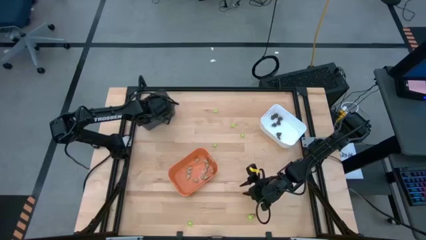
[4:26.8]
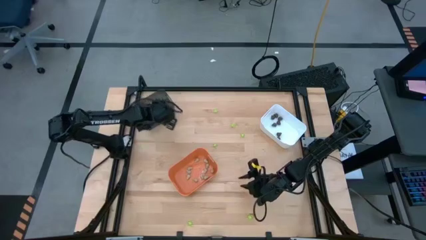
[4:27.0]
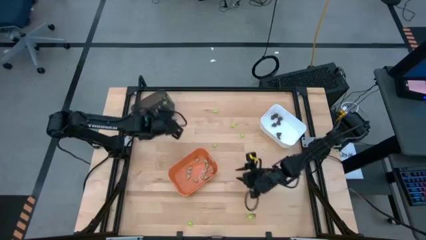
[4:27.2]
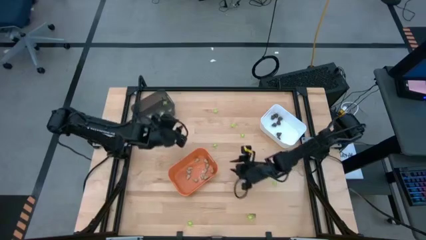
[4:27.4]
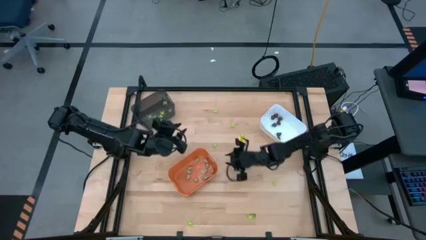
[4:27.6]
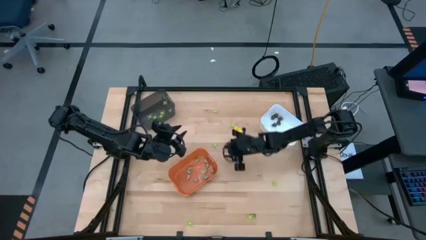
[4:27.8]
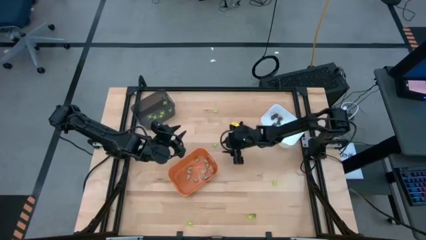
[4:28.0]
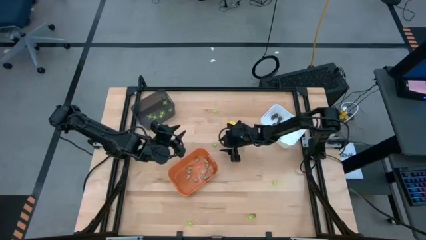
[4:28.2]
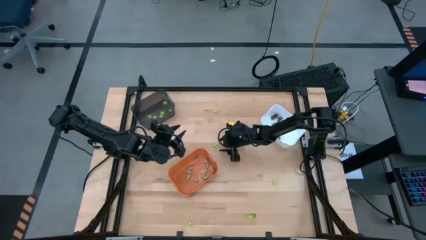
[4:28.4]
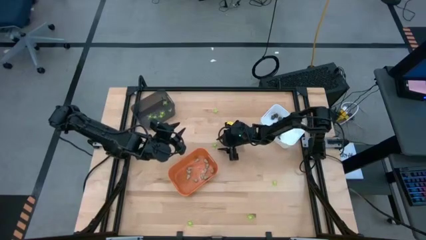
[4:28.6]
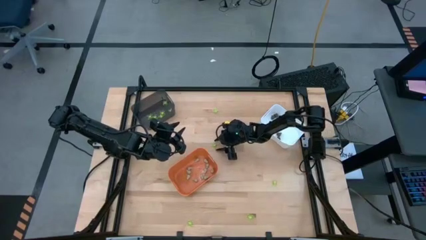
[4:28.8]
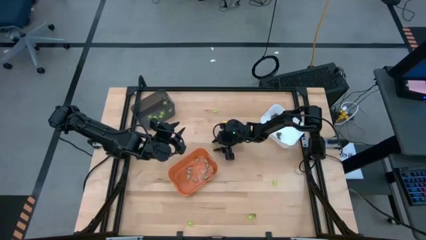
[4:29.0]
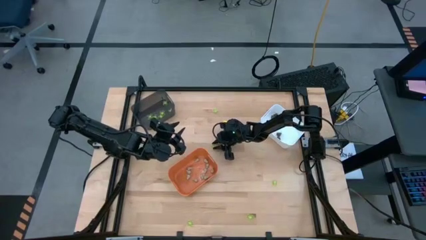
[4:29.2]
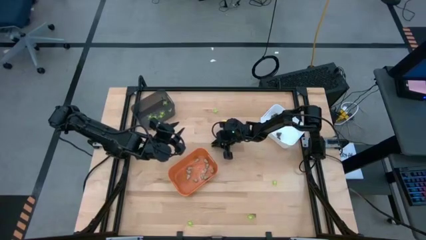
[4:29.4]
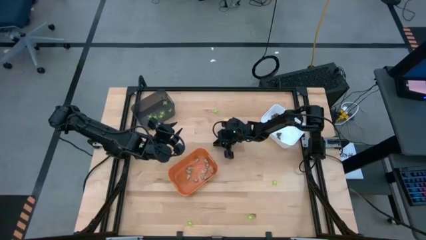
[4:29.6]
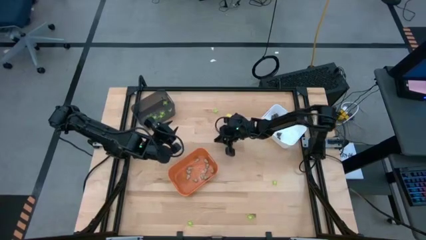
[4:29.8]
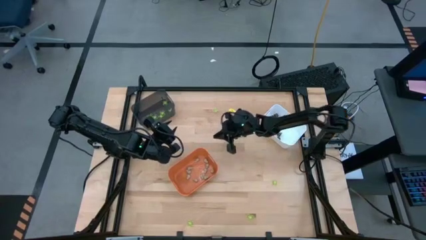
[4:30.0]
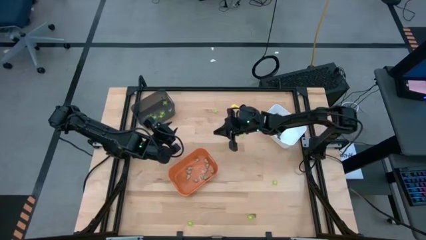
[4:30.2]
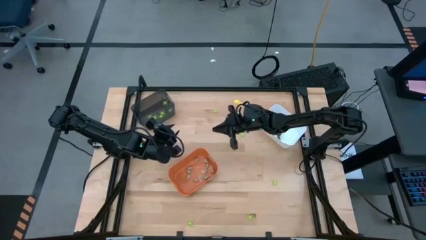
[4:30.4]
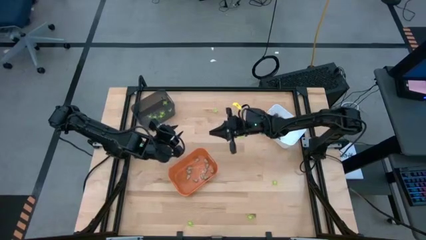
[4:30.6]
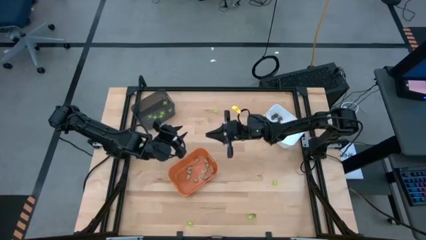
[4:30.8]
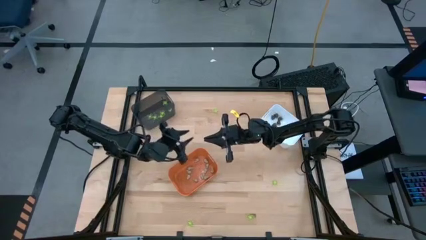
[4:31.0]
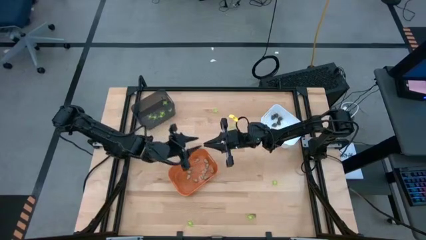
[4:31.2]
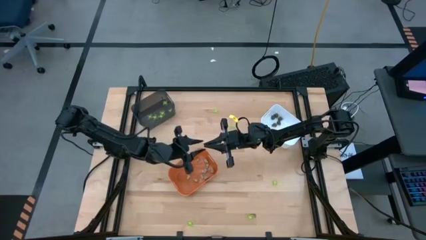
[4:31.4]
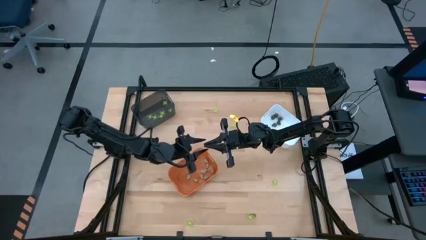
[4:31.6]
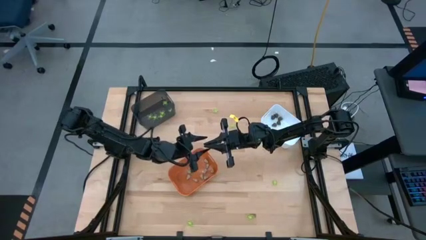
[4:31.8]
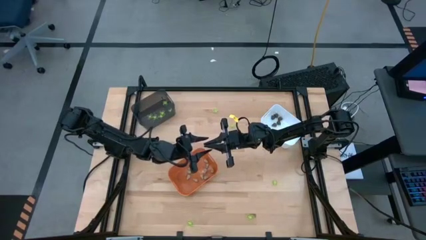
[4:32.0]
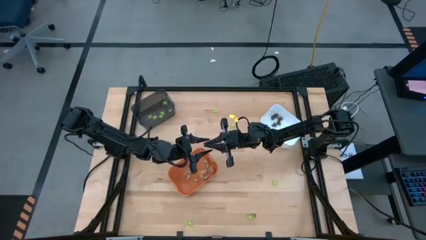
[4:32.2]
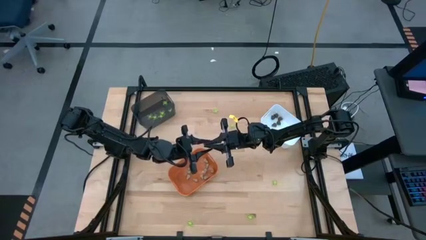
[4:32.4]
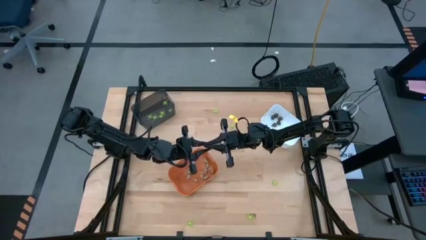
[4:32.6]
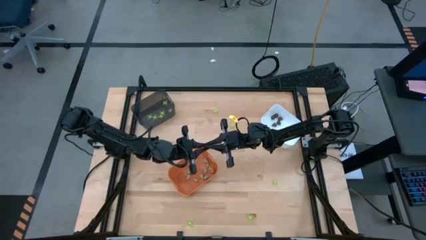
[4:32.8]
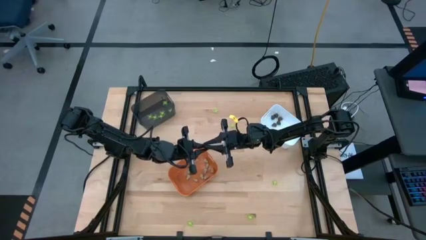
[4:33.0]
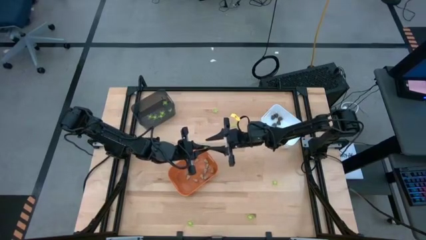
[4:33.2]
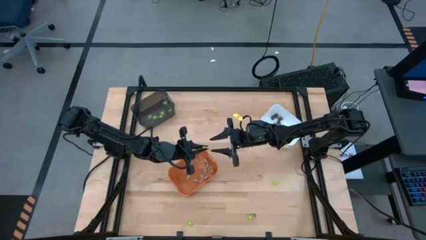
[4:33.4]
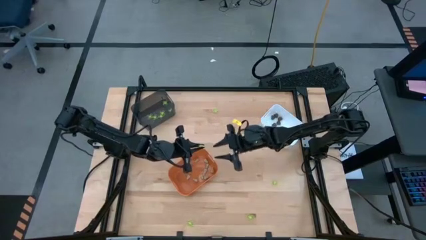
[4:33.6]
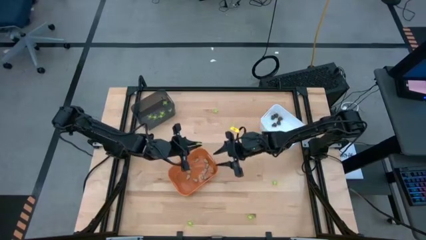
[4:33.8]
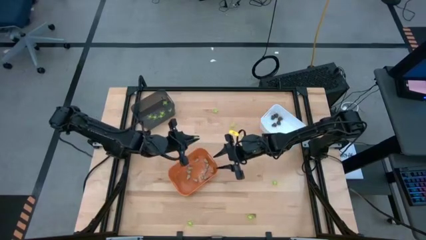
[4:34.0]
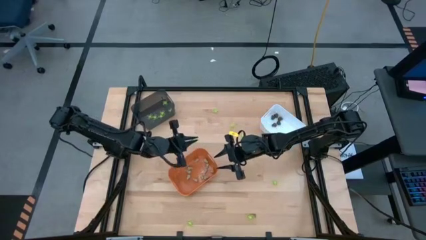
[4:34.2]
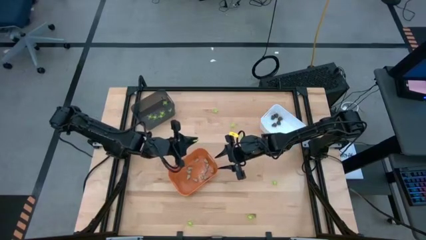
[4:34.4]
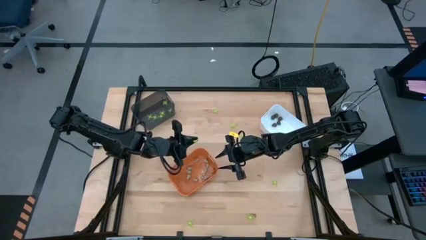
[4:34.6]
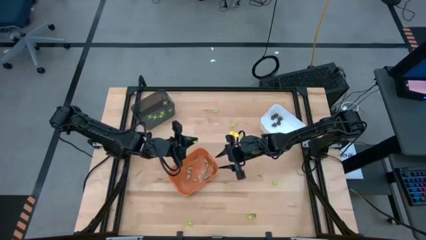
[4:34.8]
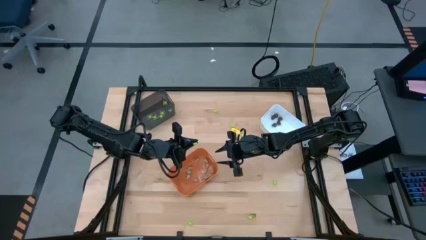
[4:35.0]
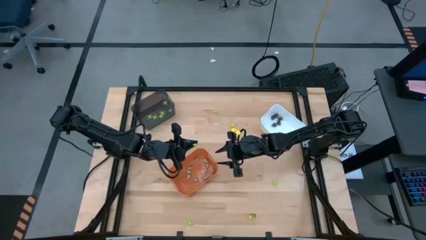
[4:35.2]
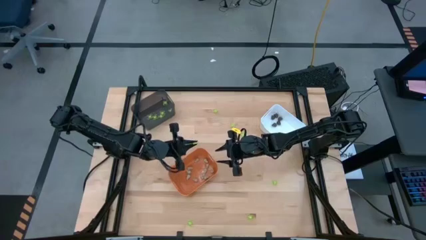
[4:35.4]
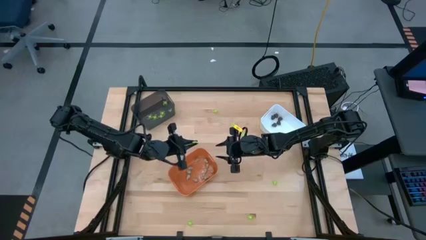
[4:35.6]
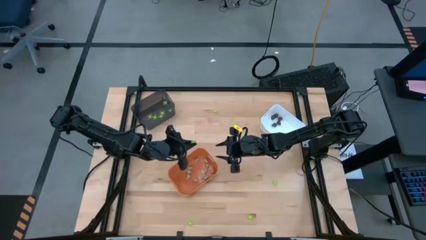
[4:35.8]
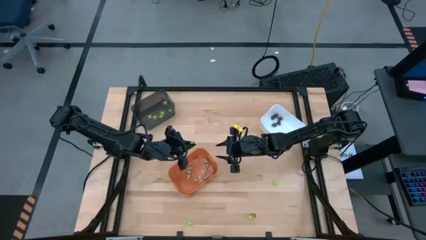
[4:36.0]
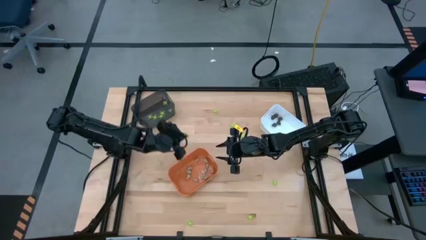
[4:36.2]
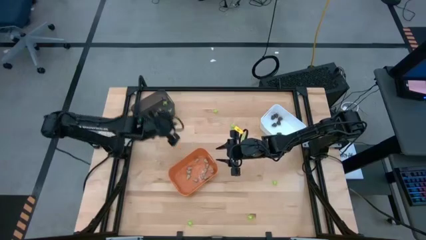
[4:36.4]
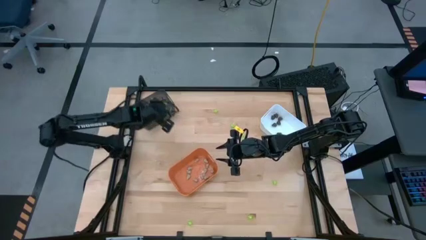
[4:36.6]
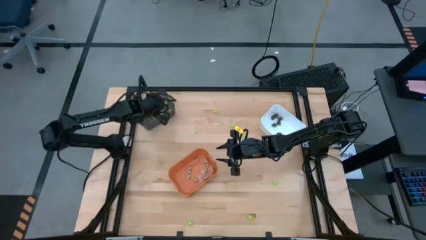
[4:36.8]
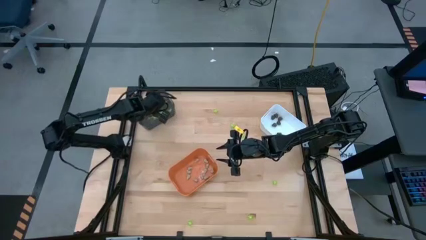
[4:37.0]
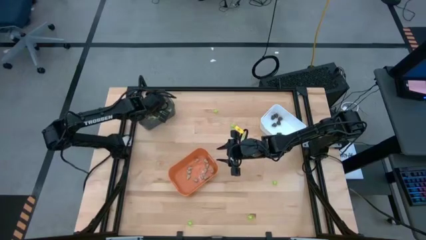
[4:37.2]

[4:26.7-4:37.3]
Task: Sort Halloween decoration
Put the green spider toy into the black bin

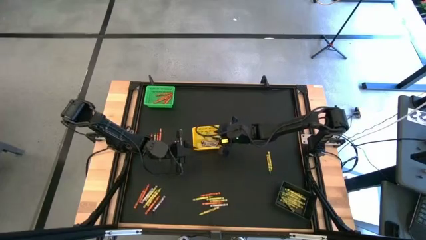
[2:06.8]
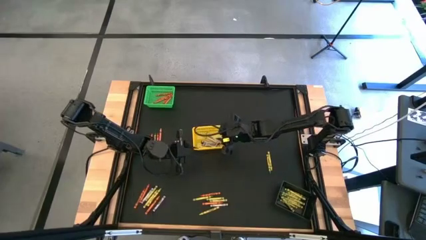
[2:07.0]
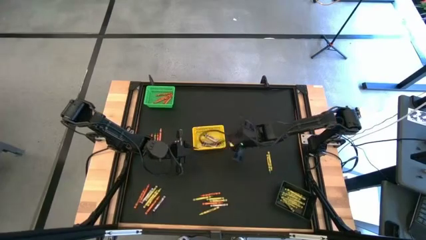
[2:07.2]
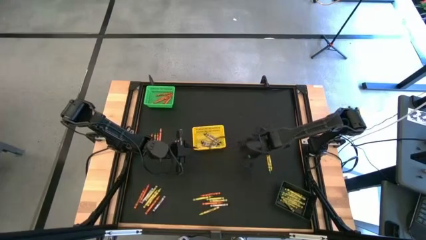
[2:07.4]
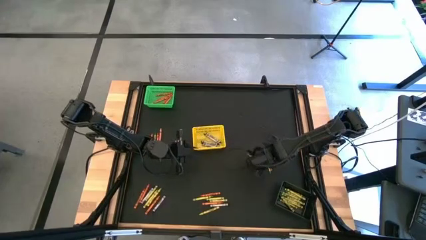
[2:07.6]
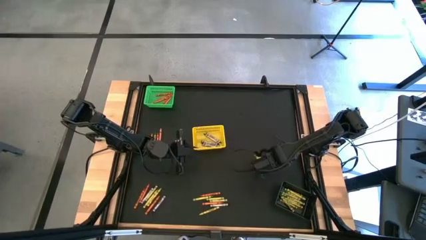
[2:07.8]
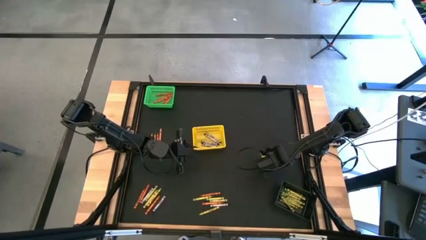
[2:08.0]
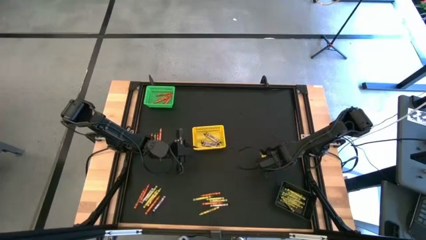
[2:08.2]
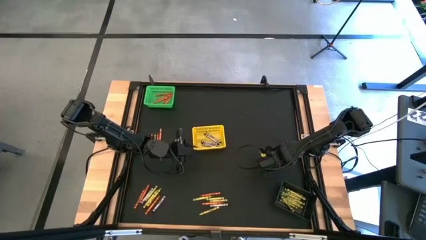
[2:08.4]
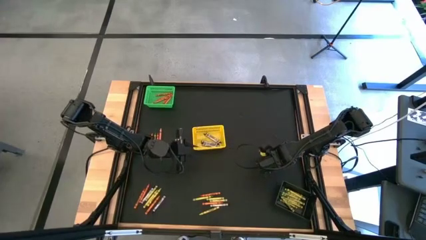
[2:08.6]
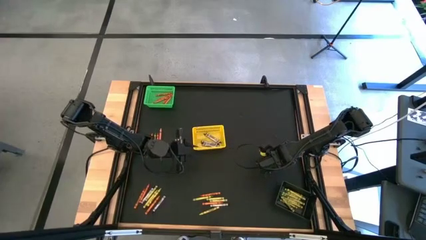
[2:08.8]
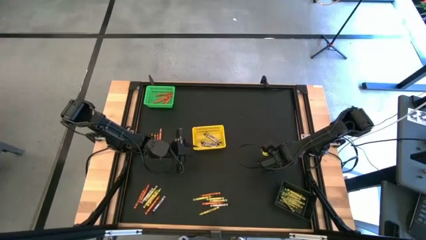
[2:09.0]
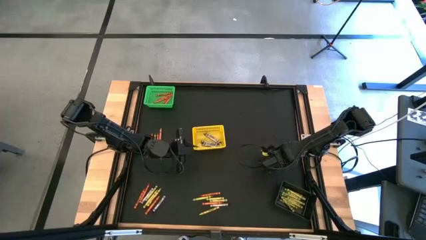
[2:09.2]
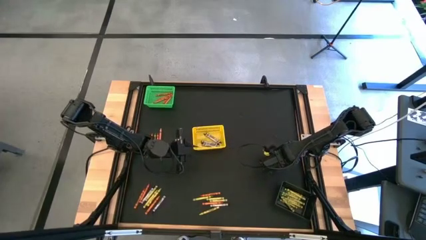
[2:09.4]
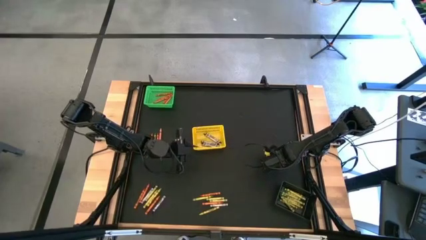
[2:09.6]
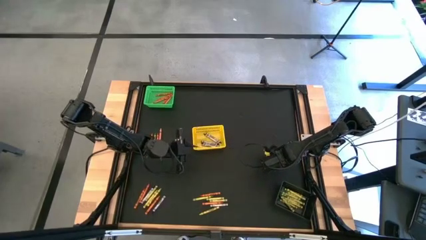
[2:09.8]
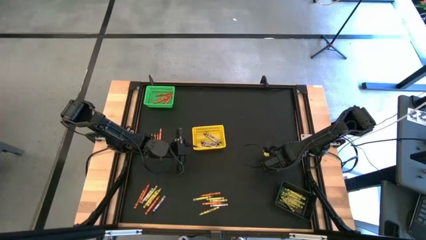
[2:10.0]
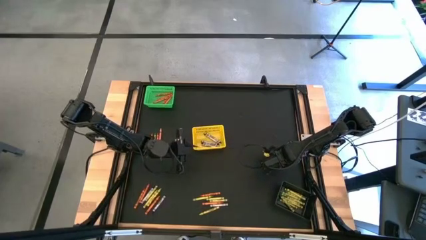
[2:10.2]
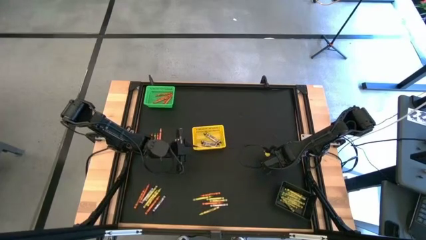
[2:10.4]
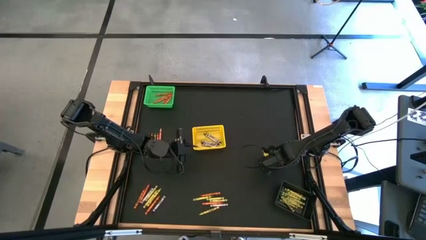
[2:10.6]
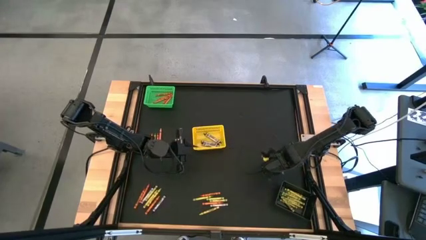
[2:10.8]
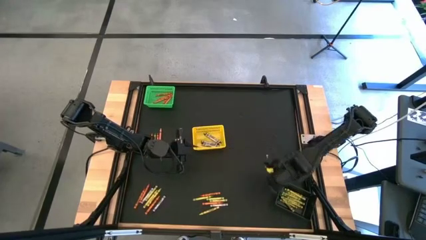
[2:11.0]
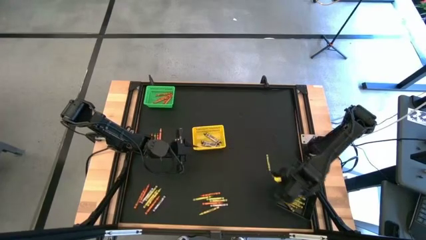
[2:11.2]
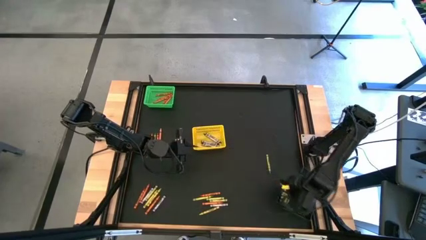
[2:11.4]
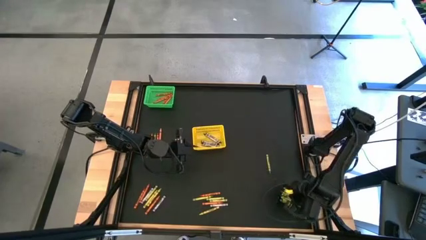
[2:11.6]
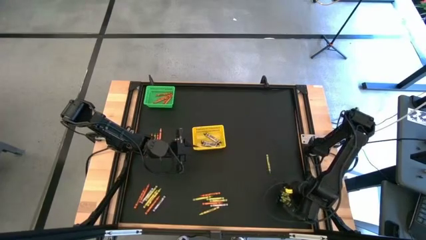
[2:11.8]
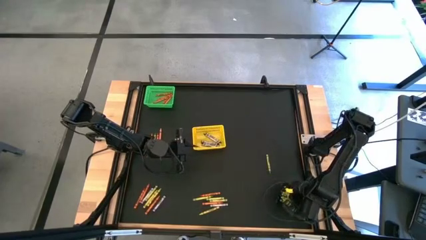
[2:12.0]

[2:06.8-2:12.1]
Task: Sort crayons
Put the green crayon into the black bin

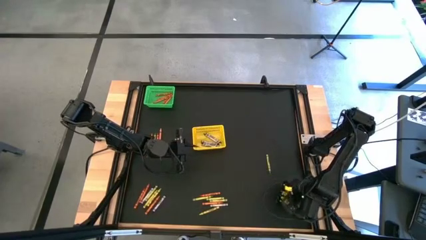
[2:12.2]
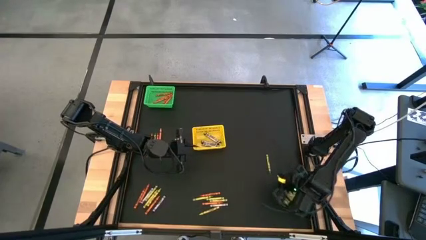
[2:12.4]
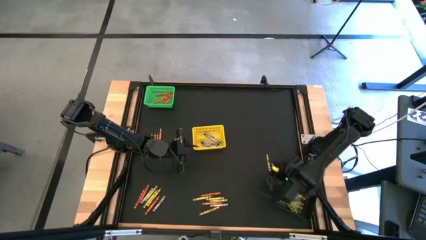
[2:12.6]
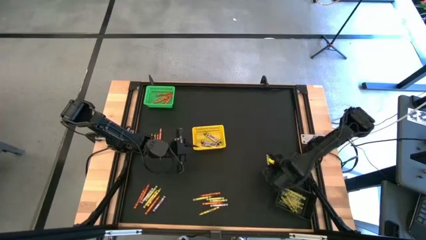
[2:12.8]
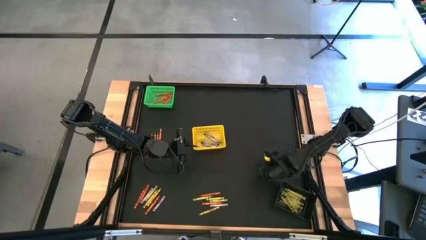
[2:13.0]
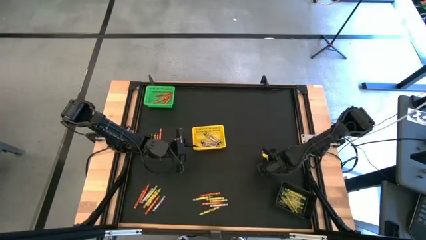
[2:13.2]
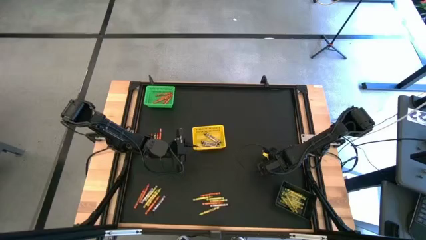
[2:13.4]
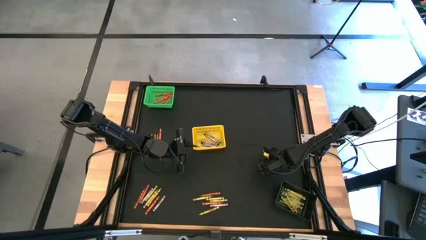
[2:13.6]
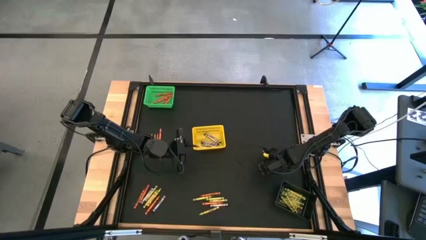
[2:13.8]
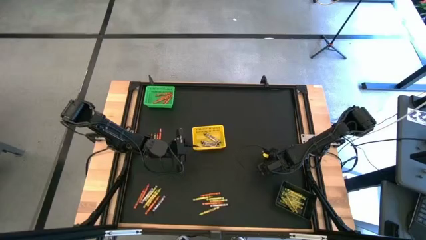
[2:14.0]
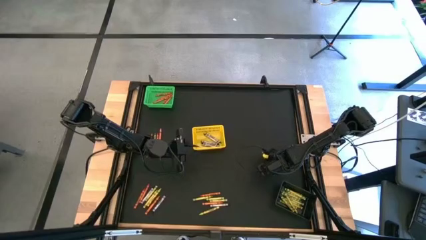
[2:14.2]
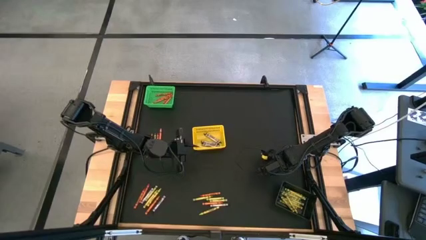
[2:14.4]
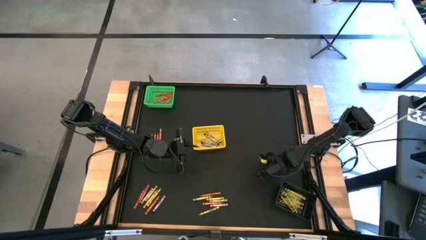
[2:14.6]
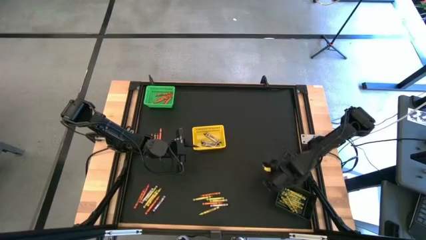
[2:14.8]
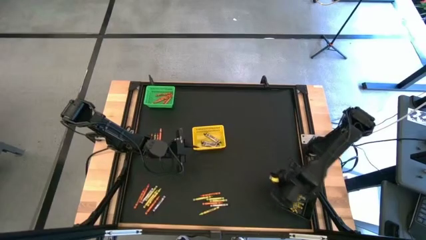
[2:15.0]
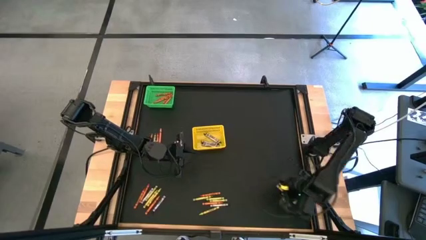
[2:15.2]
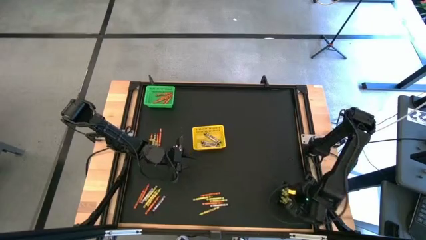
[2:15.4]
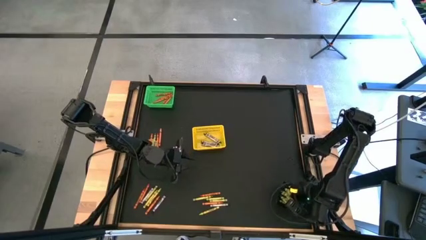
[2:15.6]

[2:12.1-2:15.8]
Put the green crayon into the black bin
